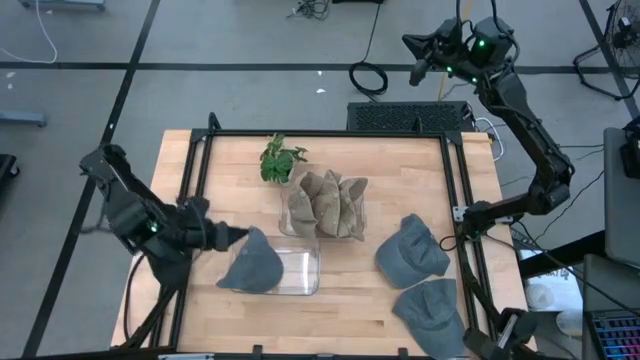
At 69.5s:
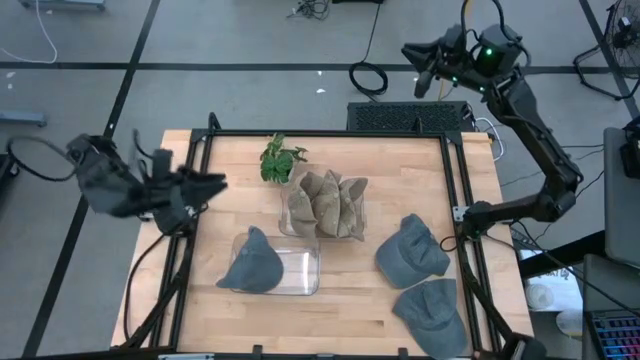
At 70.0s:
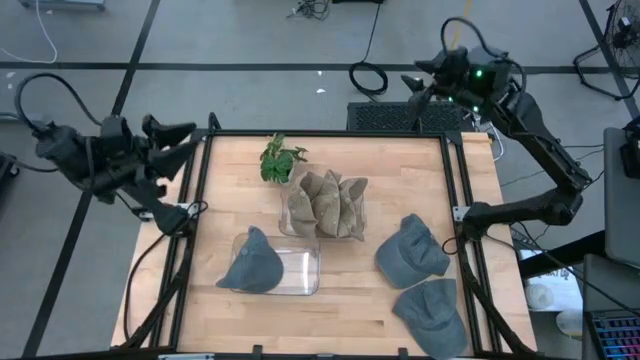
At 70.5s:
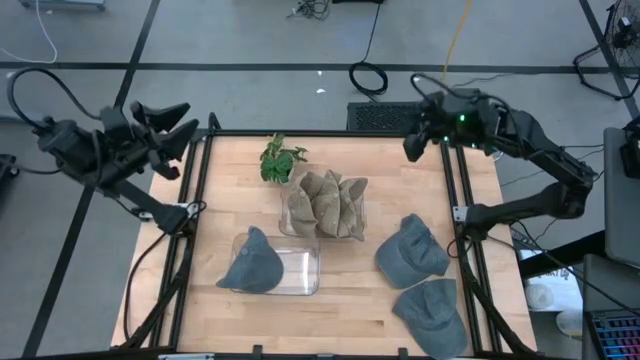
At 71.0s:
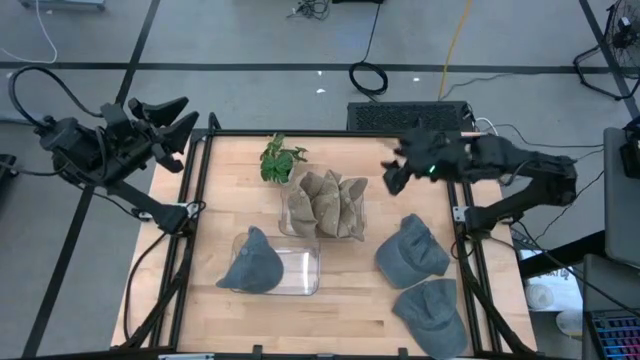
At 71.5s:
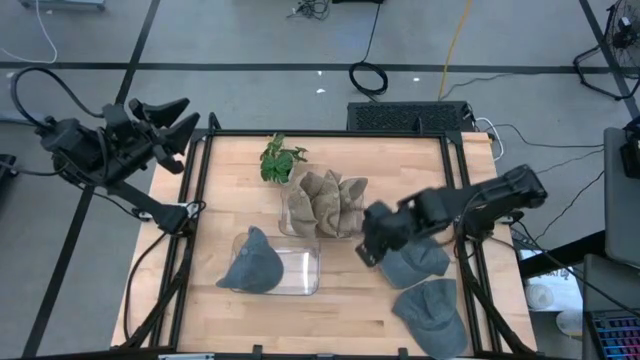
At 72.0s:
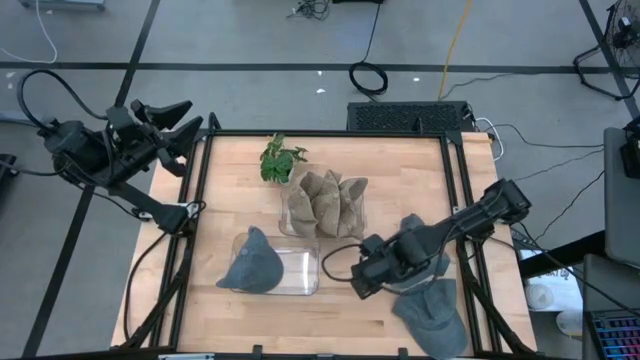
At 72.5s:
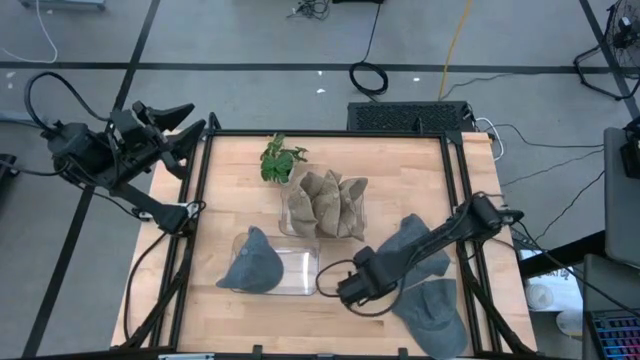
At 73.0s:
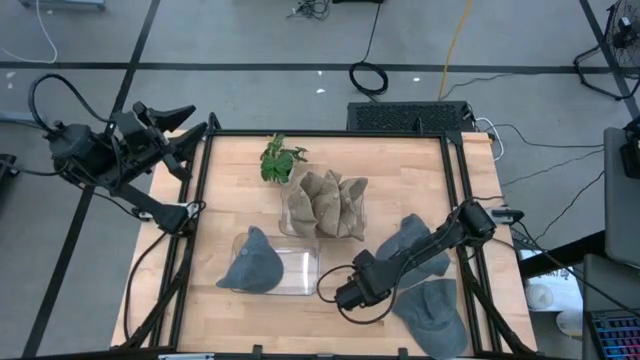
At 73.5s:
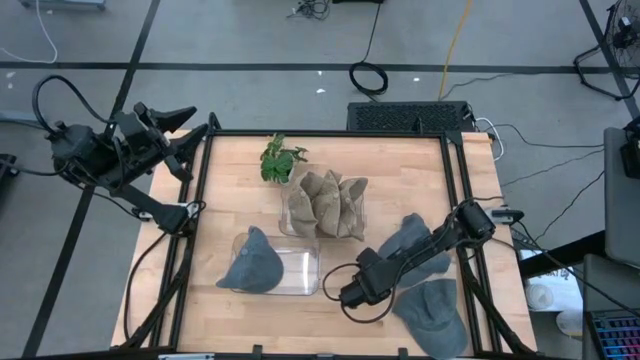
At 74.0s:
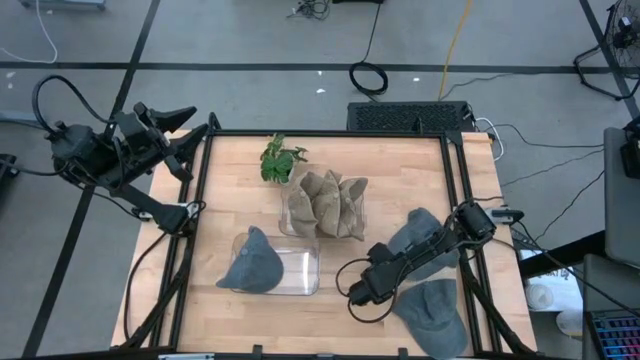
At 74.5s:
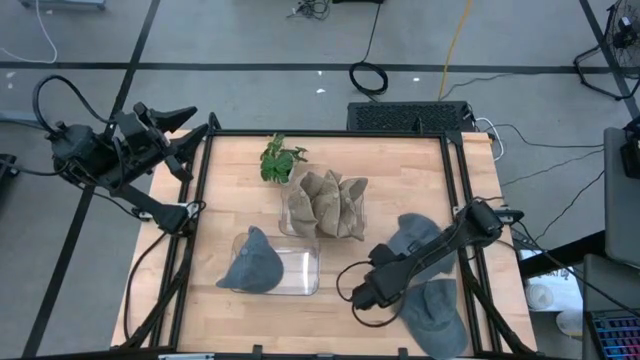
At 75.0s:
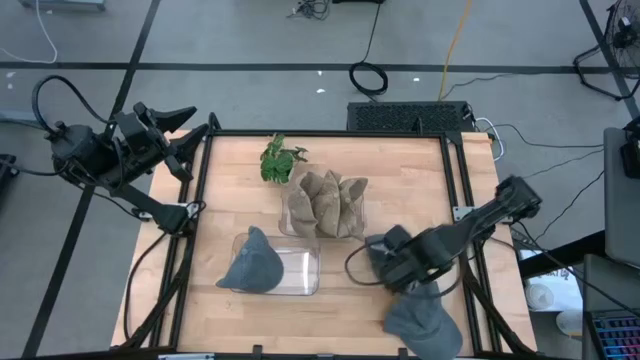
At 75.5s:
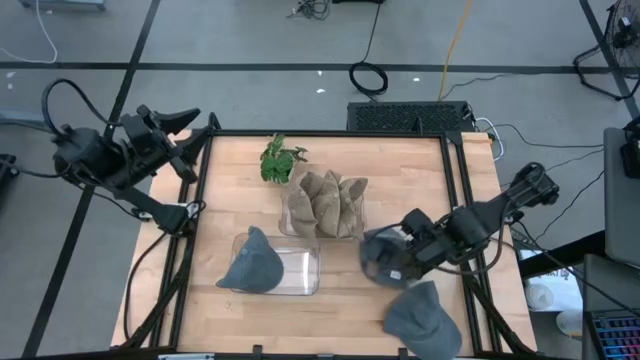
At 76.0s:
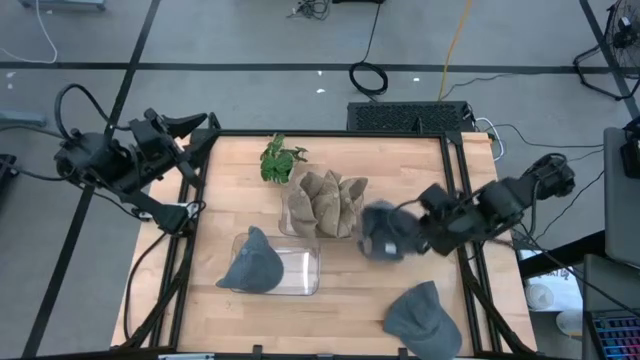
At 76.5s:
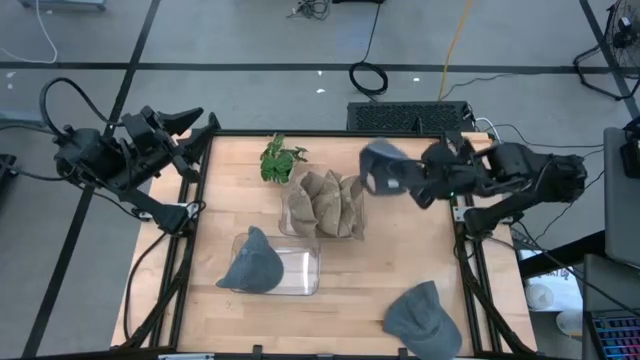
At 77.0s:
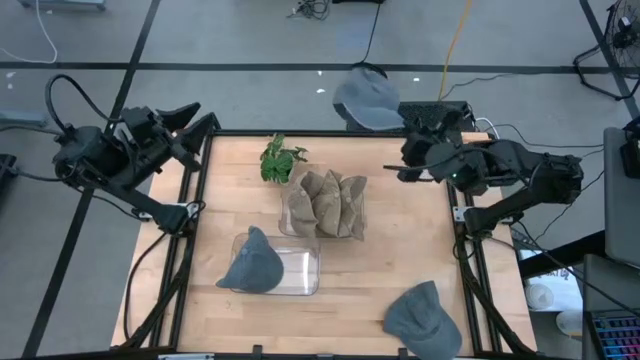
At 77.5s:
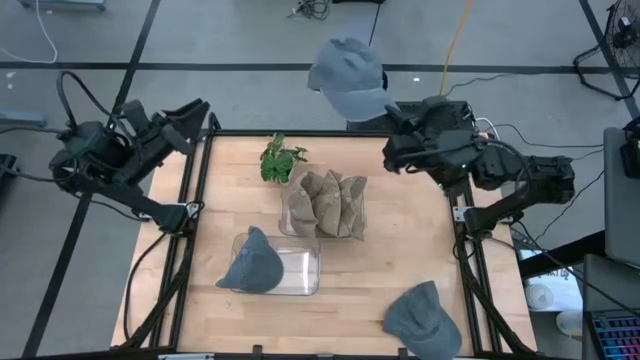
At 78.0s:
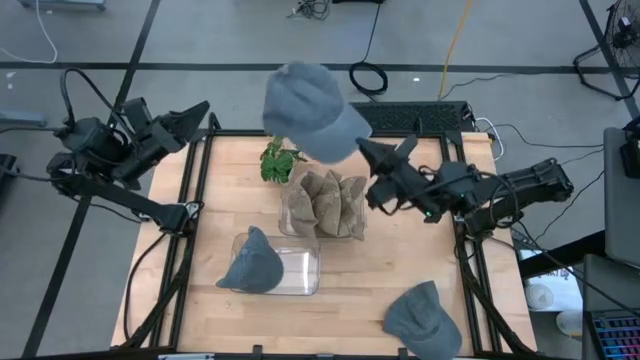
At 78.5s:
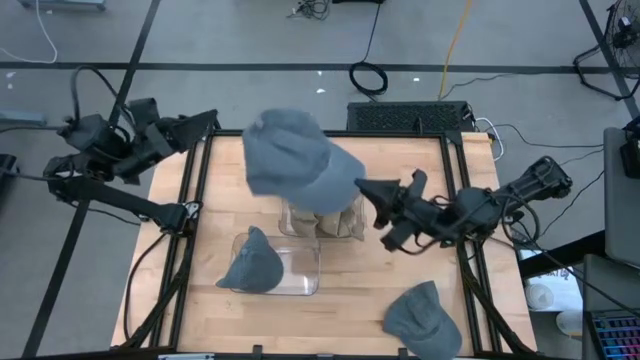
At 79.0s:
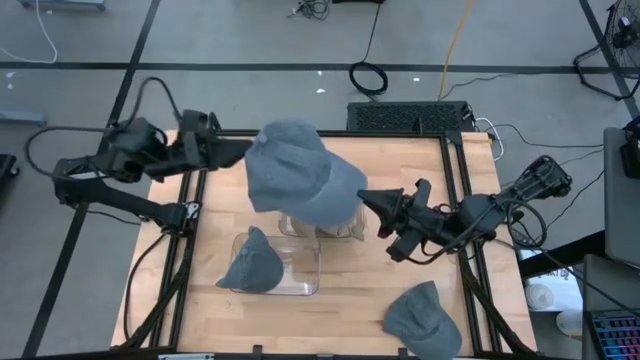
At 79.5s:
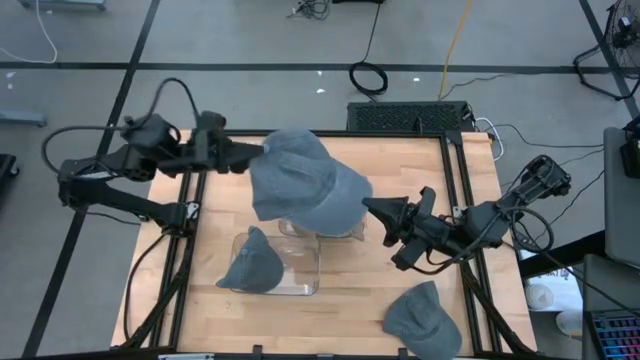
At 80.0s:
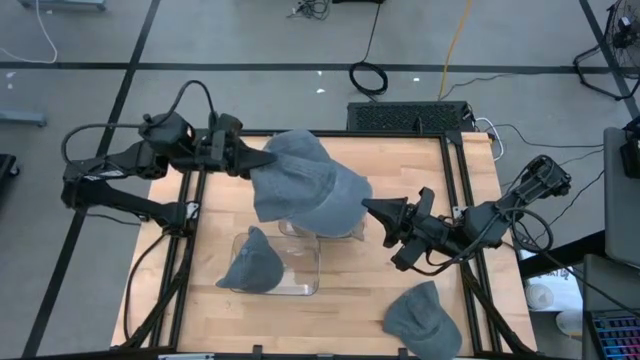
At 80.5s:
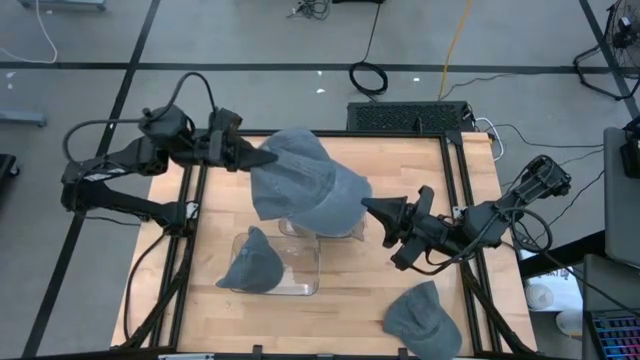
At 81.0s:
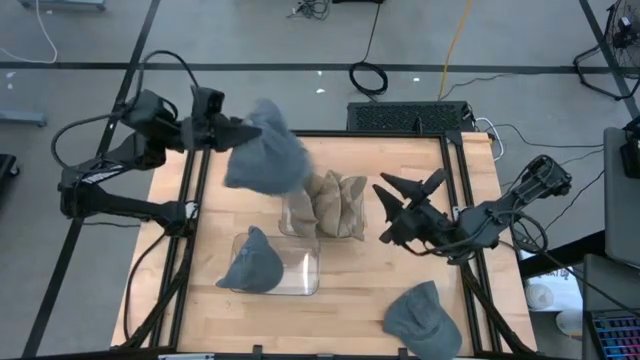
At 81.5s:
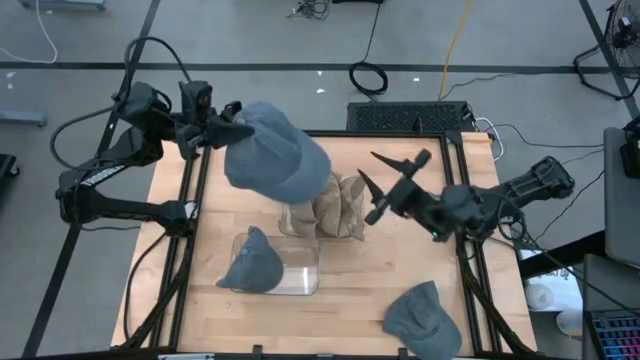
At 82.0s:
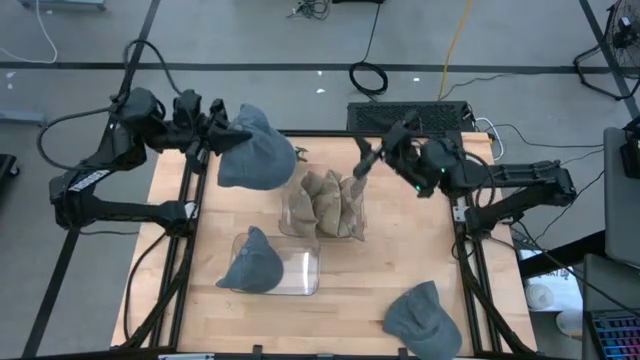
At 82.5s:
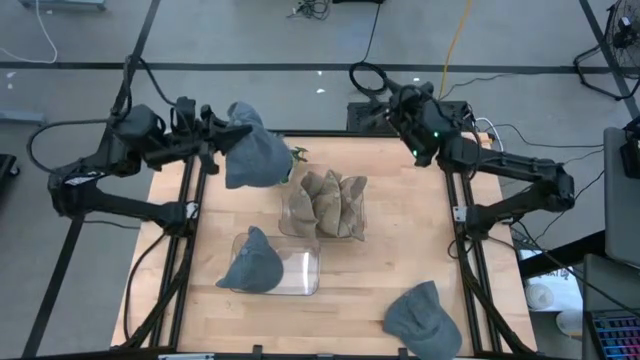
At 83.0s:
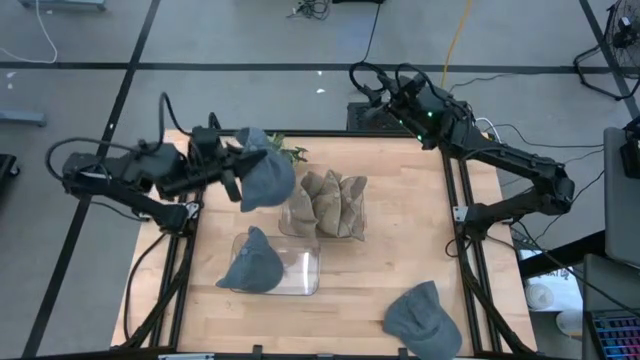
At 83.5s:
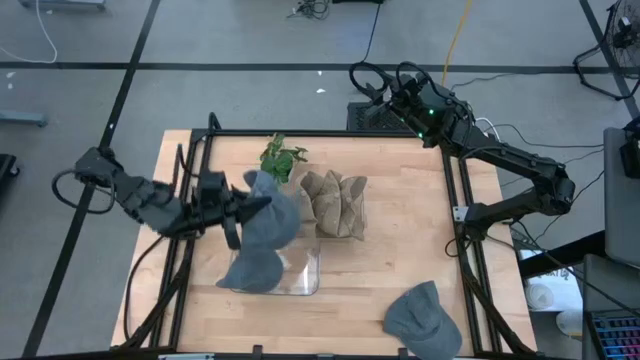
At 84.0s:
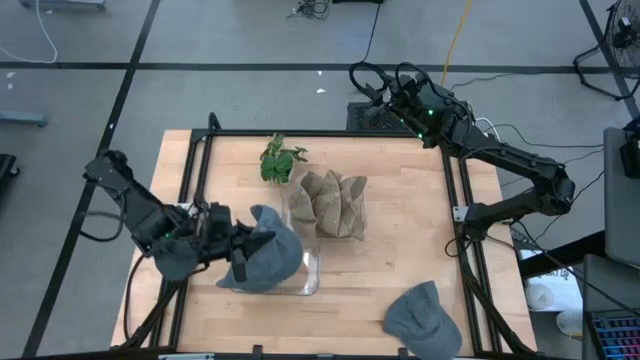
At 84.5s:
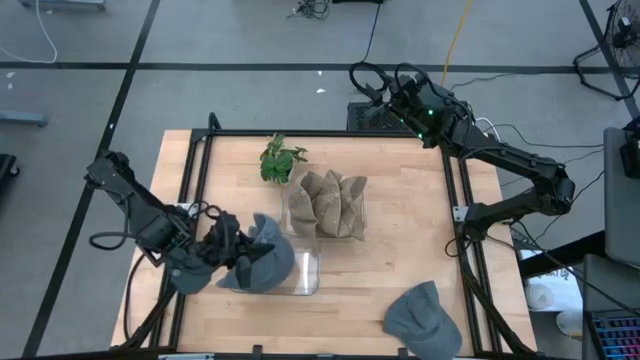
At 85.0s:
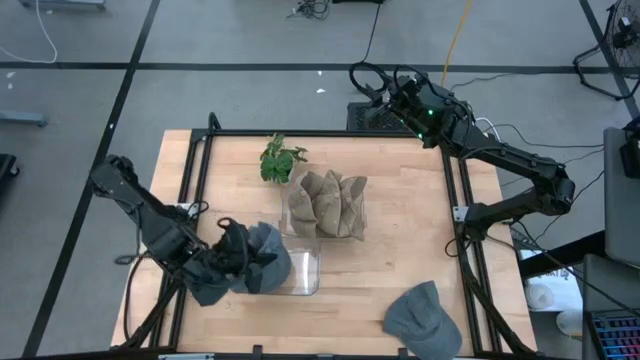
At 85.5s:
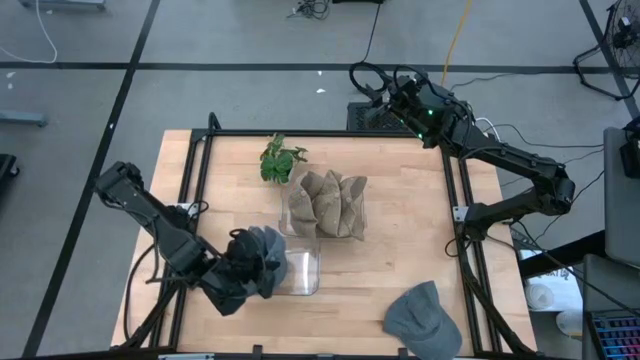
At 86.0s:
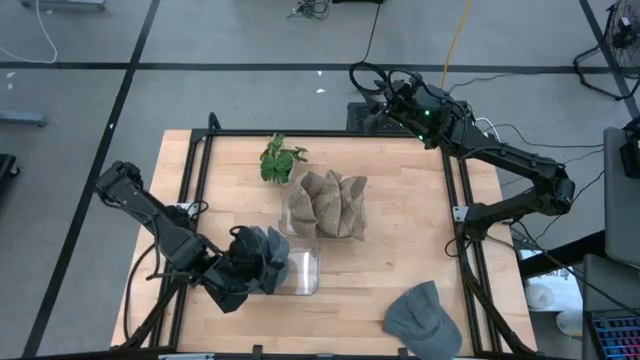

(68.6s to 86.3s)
Task: Pick & Place hat
Put the top blue cap into the bottom transparent bin
